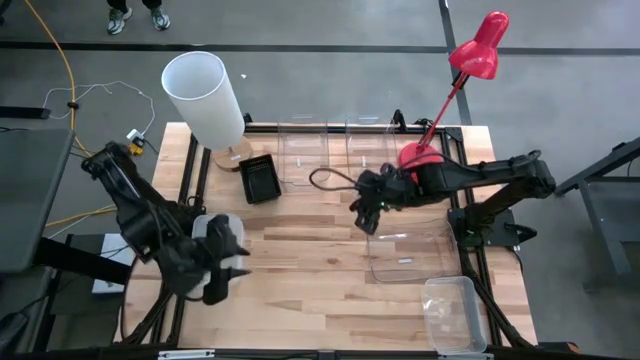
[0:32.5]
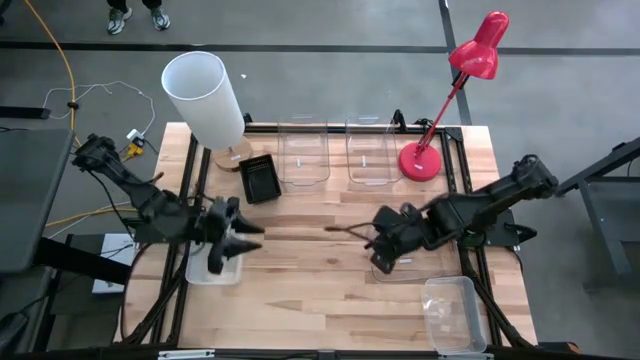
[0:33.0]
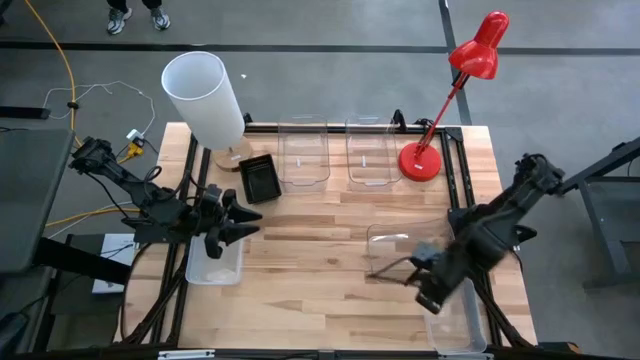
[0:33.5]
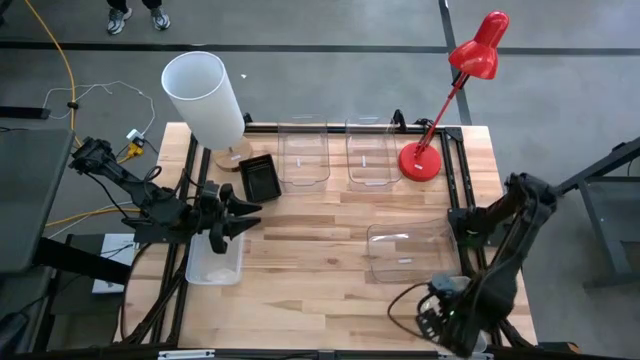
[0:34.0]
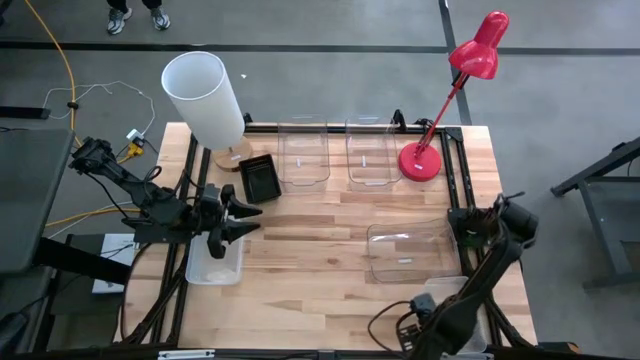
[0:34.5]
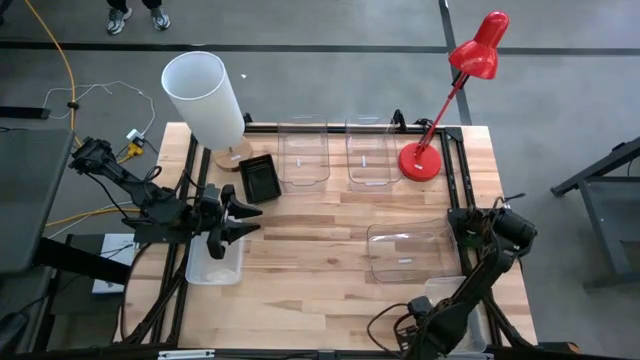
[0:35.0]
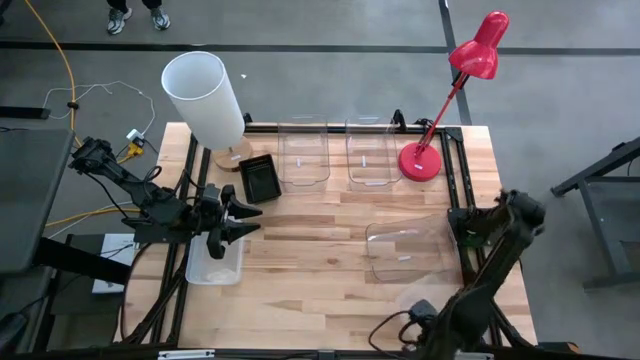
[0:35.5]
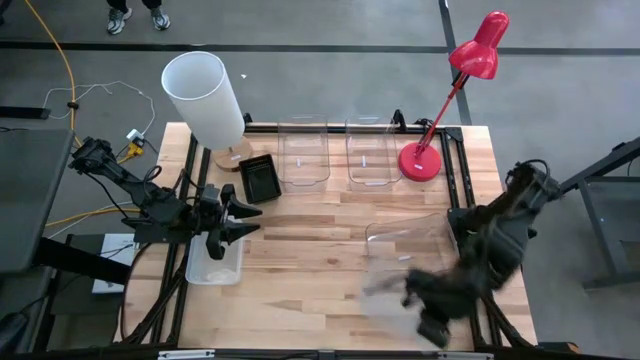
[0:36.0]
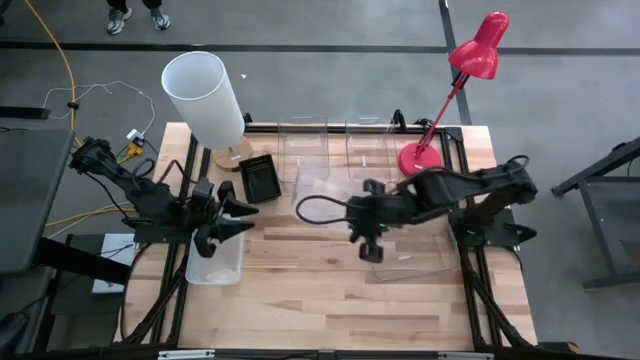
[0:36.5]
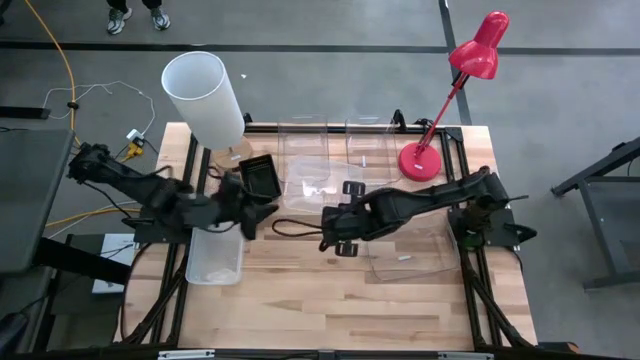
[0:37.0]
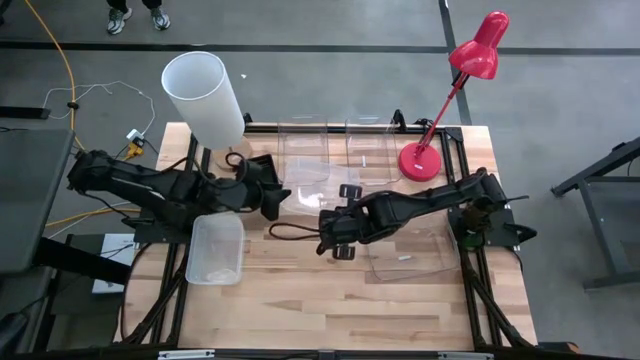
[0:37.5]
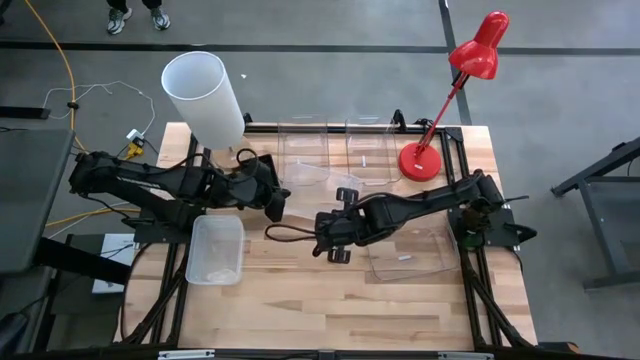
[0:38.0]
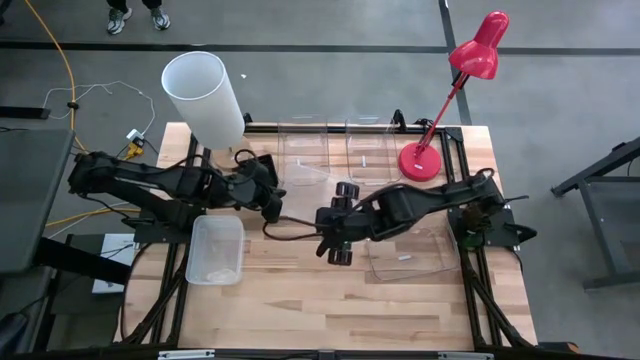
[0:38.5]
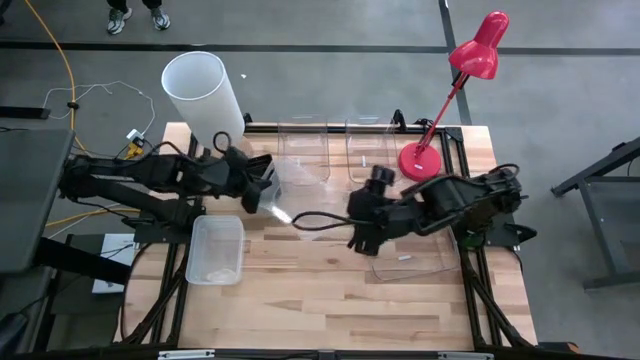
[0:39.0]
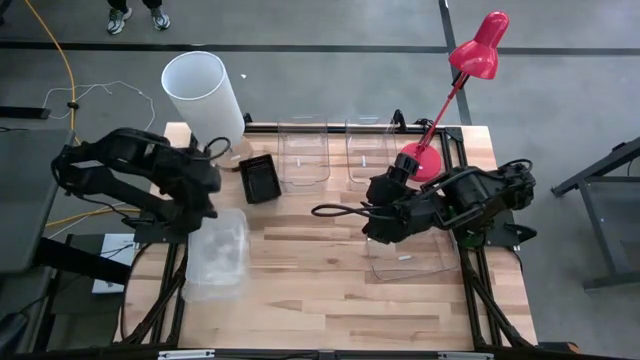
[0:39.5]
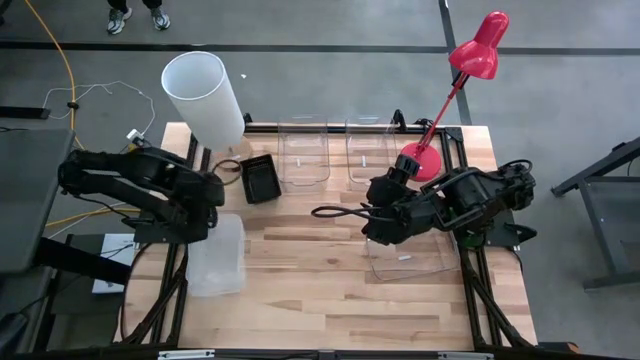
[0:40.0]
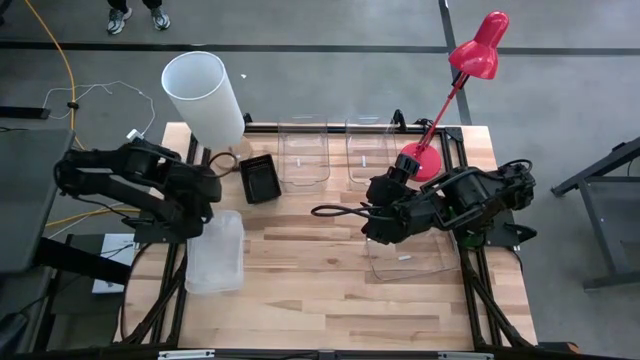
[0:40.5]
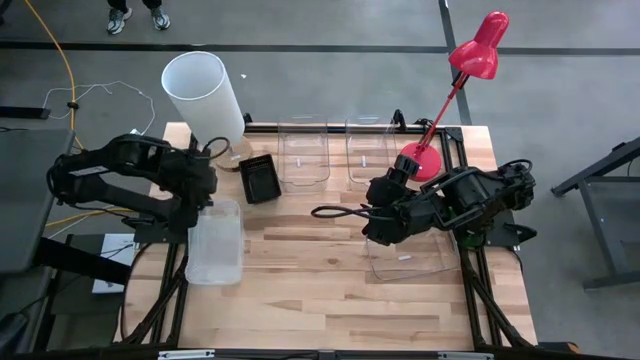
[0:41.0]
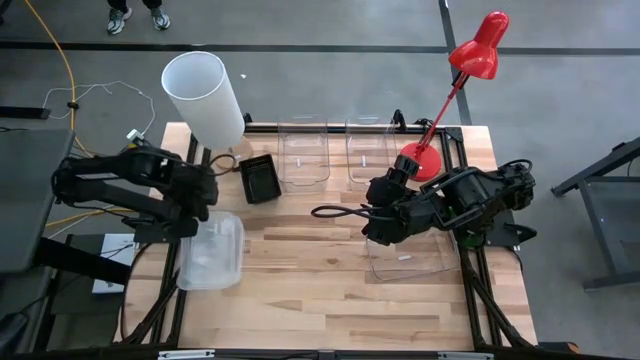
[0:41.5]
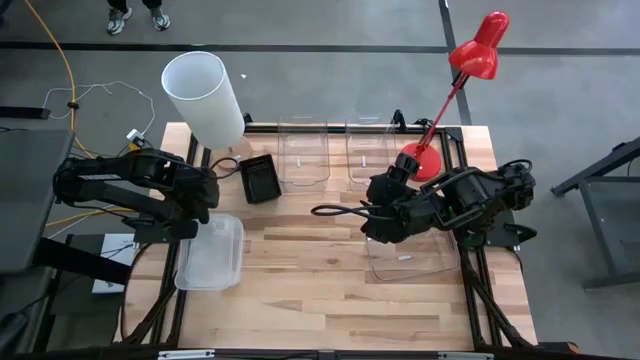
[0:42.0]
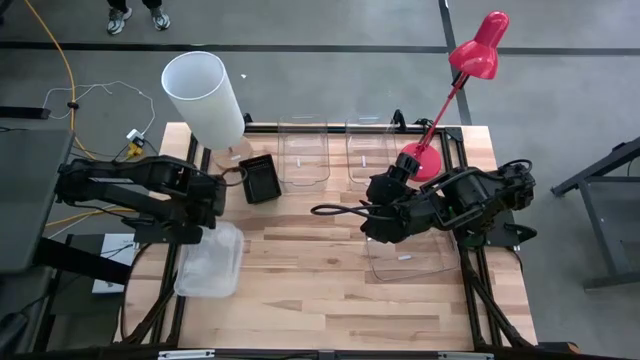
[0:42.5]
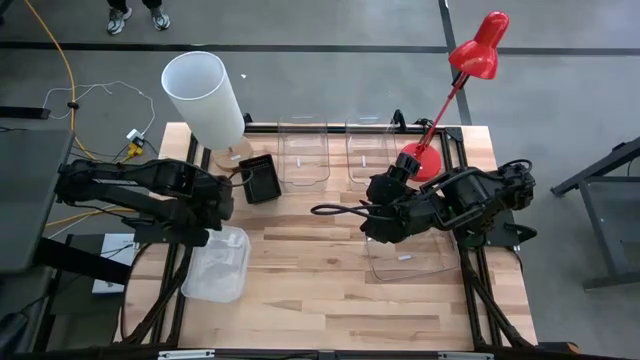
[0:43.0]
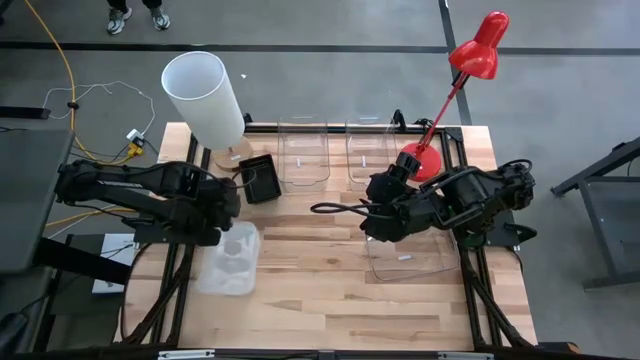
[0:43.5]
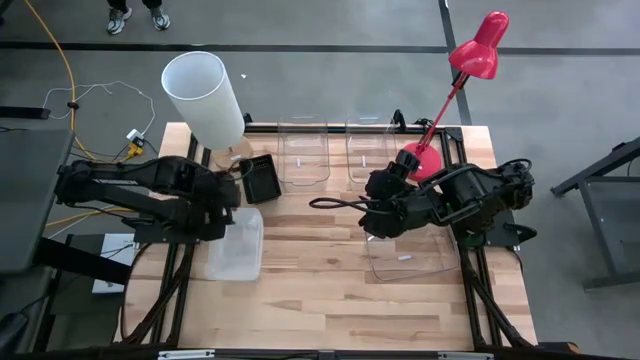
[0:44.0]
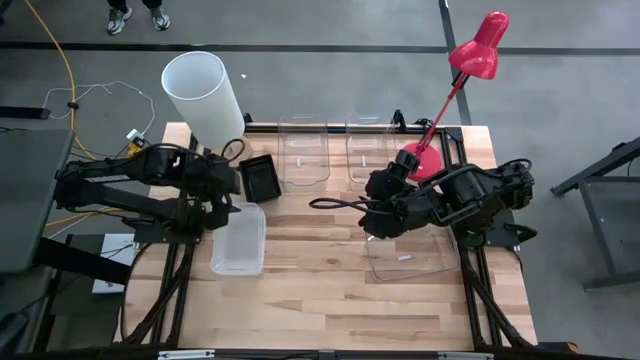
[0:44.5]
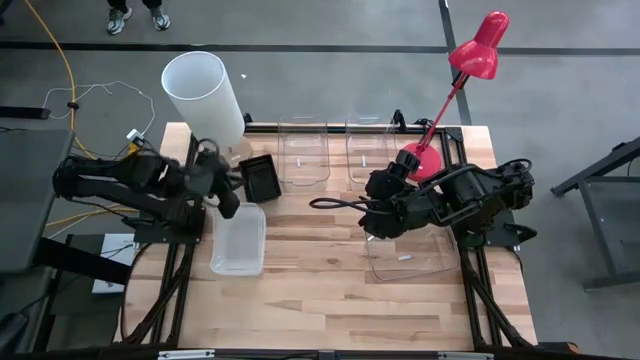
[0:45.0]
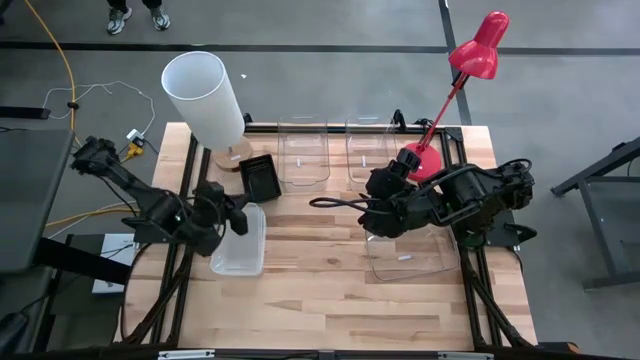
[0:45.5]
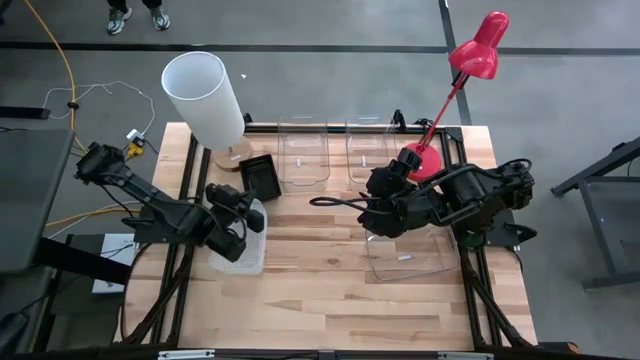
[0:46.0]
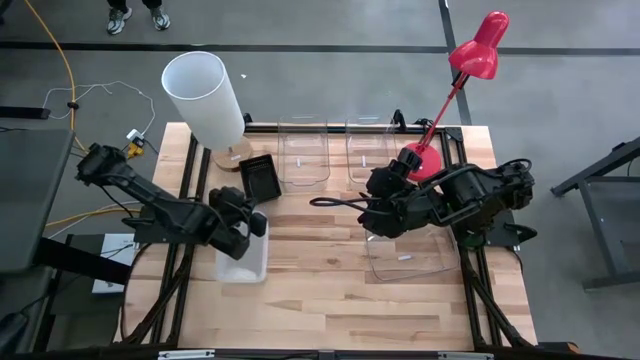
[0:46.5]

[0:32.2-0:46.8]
Stack the bottom white bin on the white bins

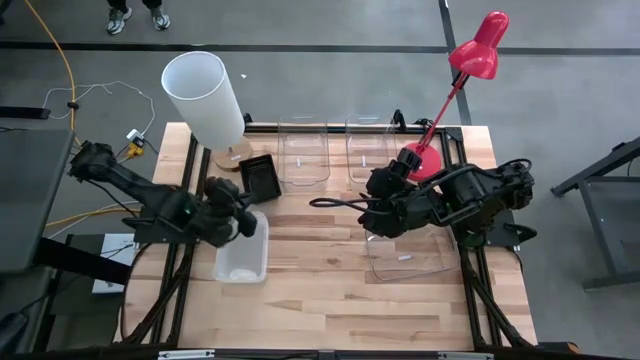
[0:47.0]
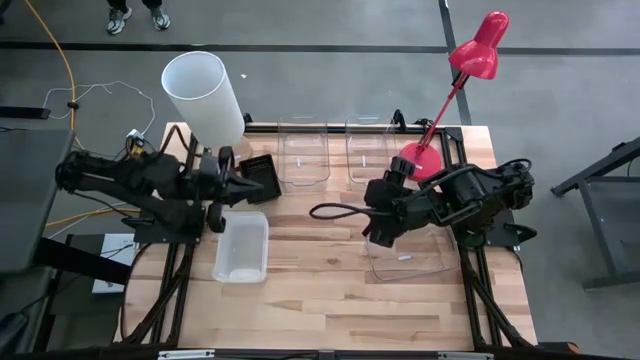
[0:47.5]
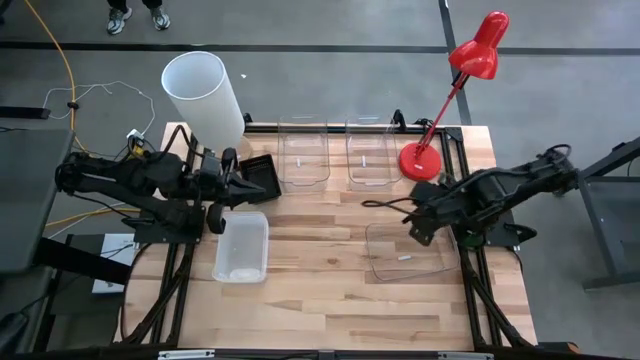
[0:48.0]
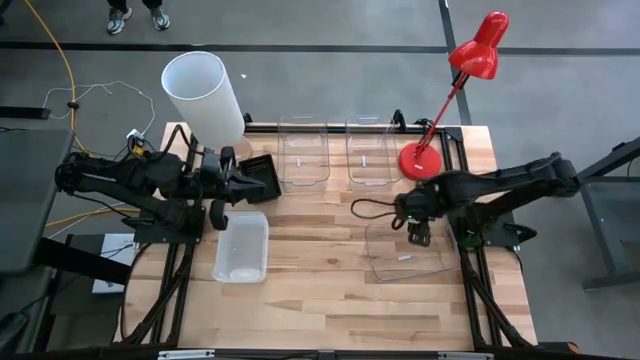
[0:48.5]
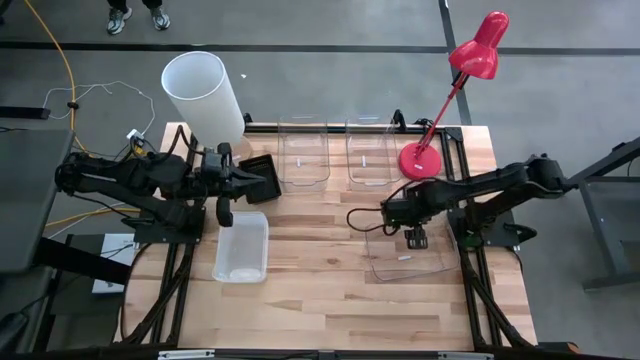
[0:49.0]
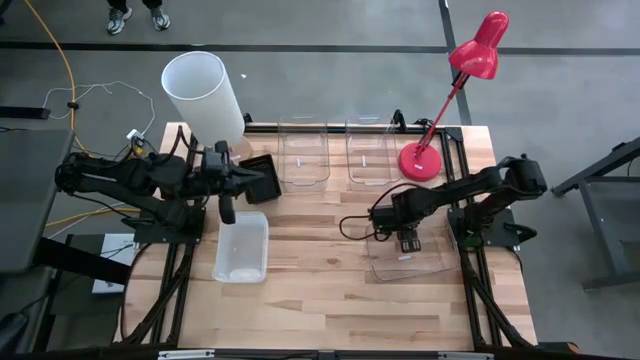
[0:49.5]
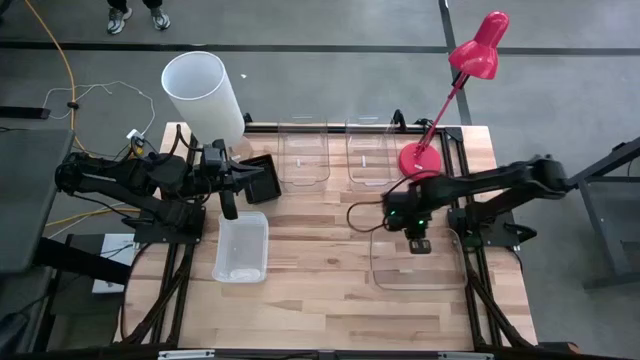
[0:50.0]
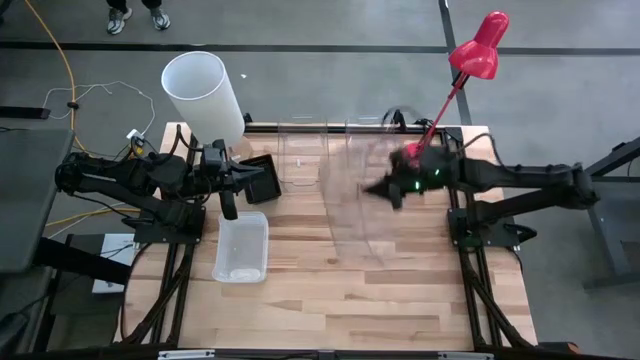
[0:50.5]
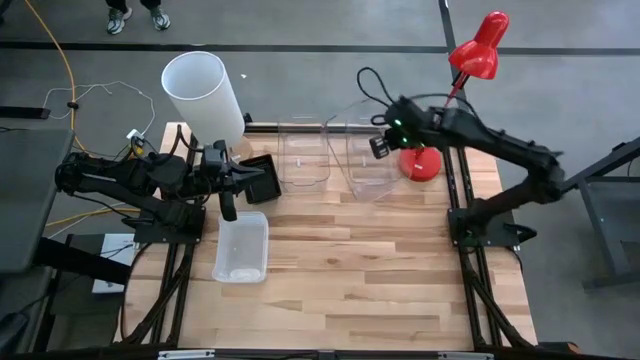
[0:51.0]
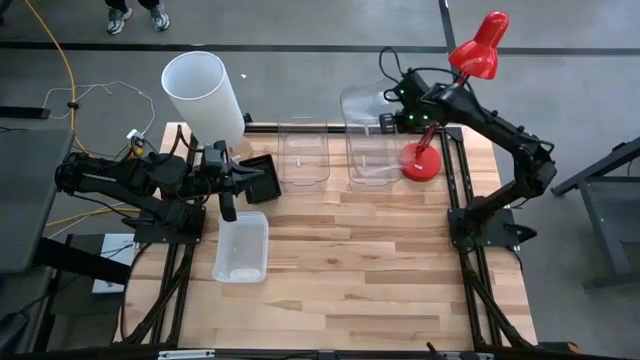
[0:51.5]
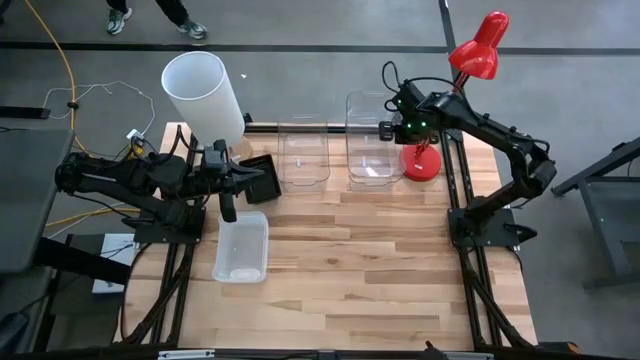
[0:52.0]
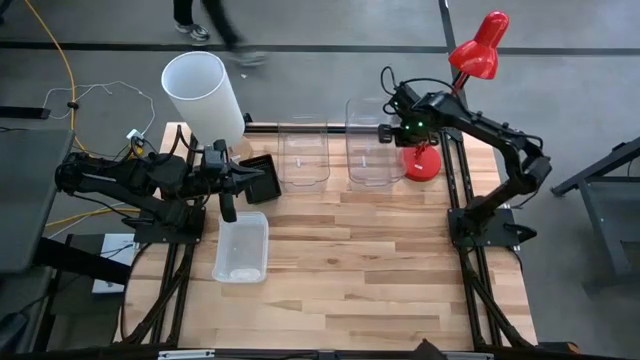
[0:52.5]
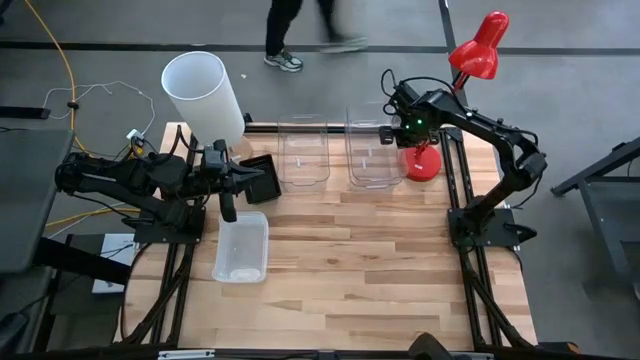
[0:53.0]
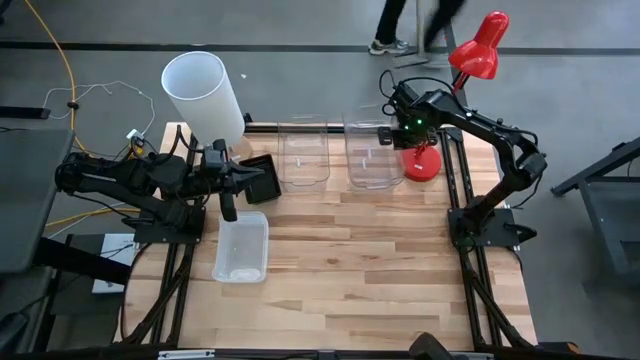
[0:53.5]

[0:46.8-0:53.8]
Stack the bottom transparent bin on the top right transparent bin
